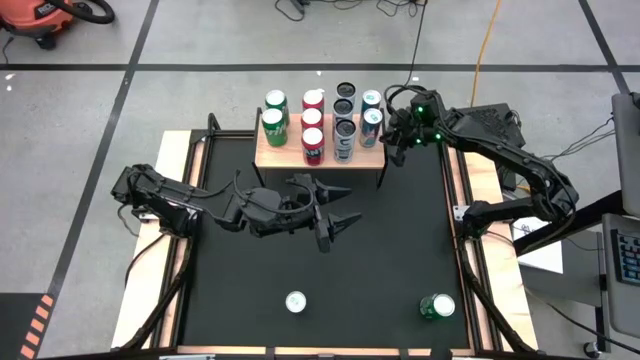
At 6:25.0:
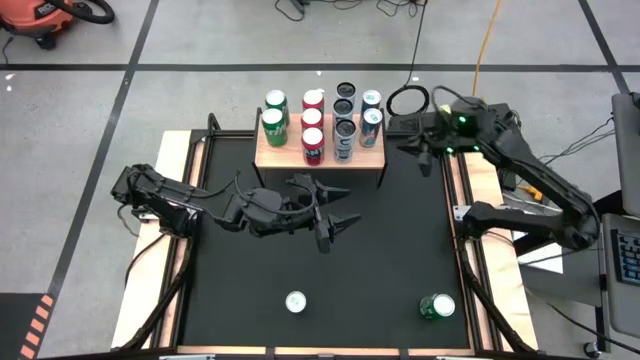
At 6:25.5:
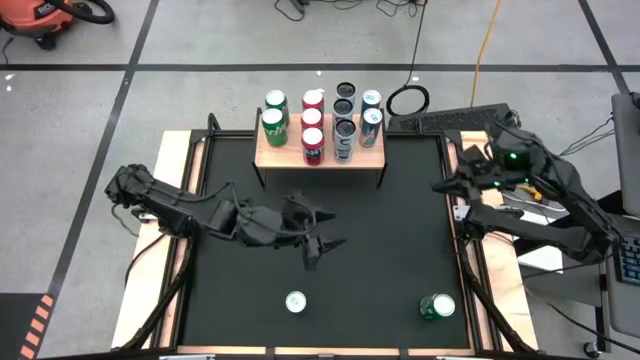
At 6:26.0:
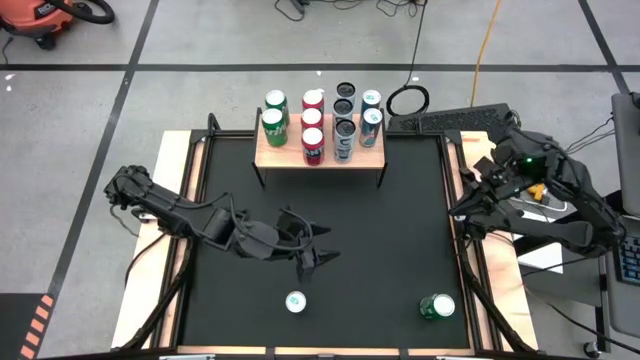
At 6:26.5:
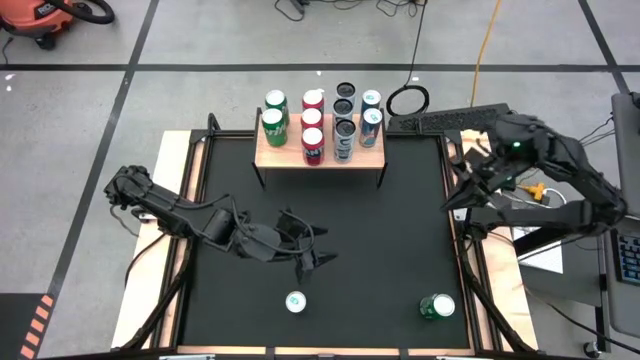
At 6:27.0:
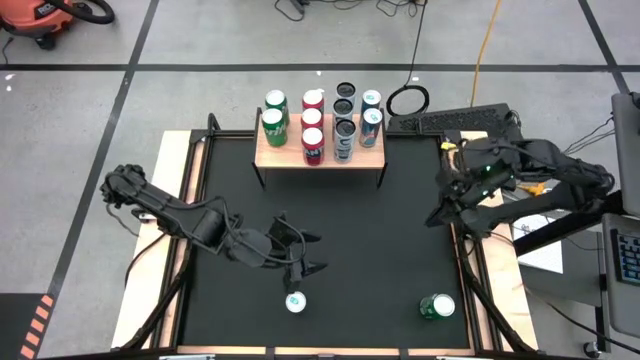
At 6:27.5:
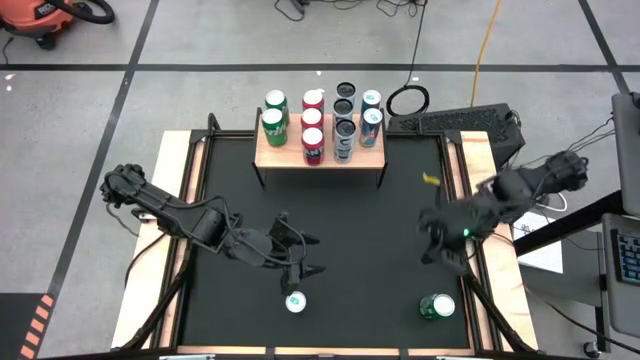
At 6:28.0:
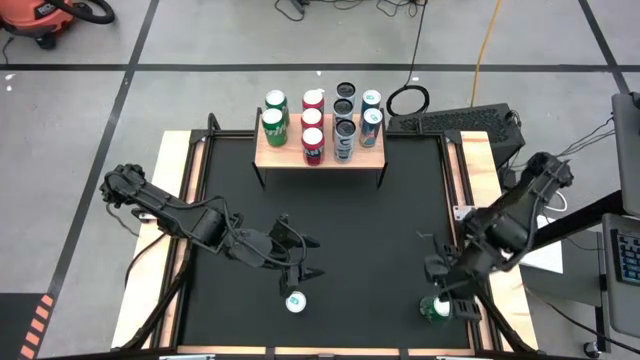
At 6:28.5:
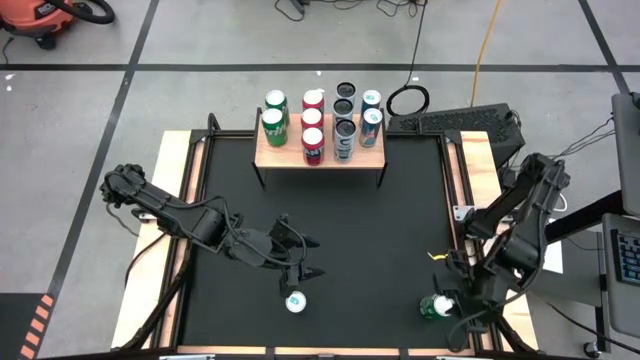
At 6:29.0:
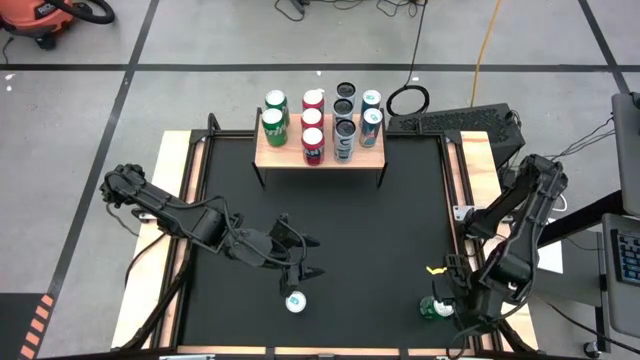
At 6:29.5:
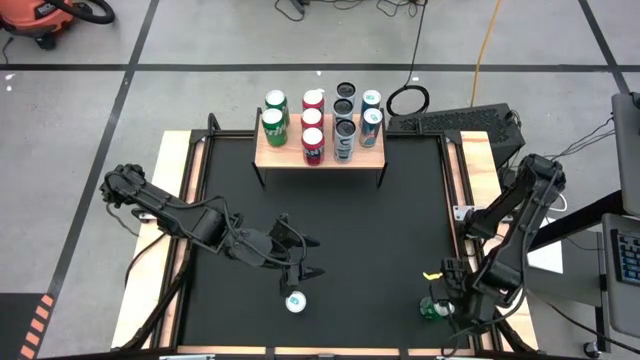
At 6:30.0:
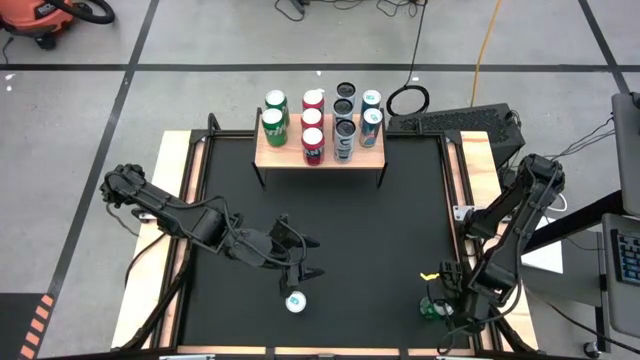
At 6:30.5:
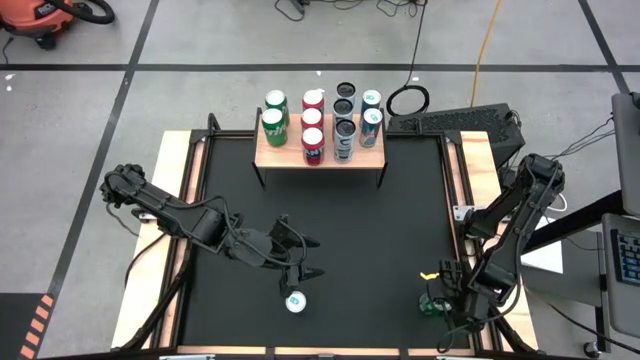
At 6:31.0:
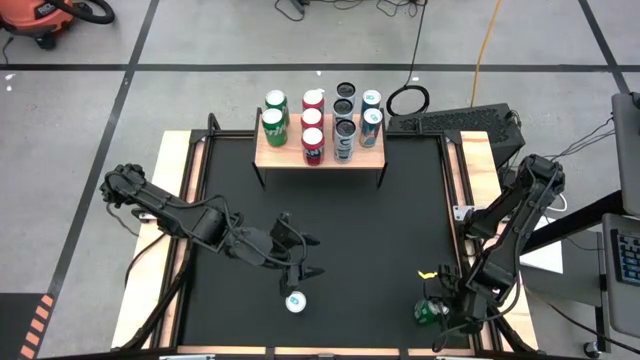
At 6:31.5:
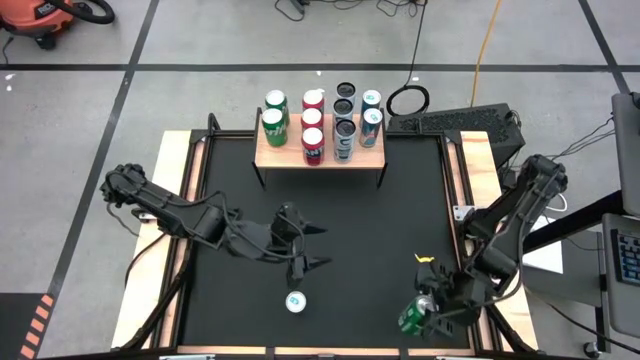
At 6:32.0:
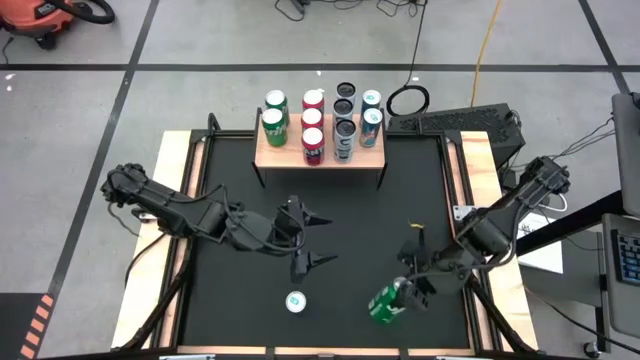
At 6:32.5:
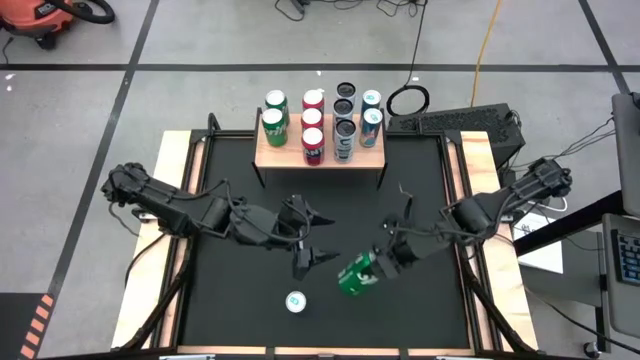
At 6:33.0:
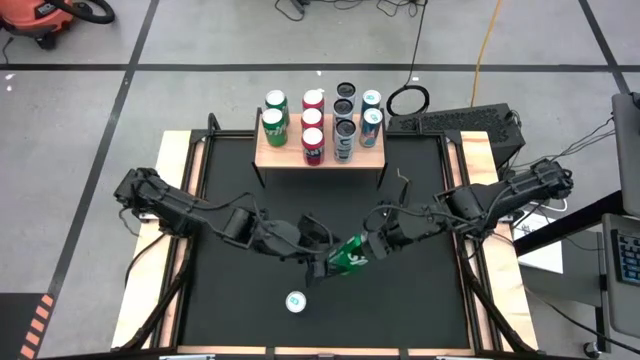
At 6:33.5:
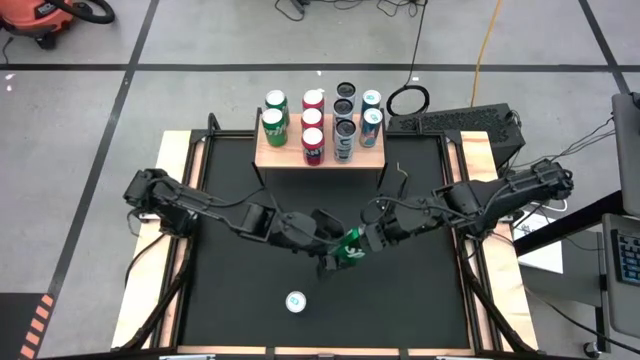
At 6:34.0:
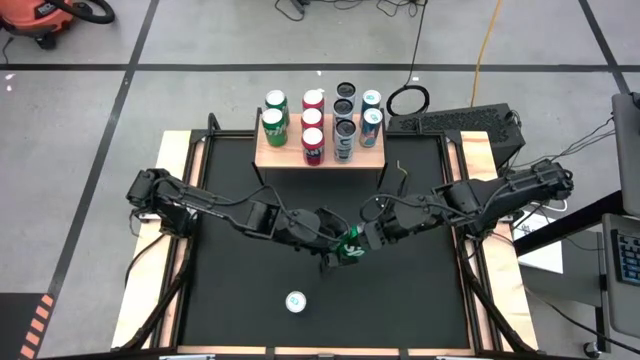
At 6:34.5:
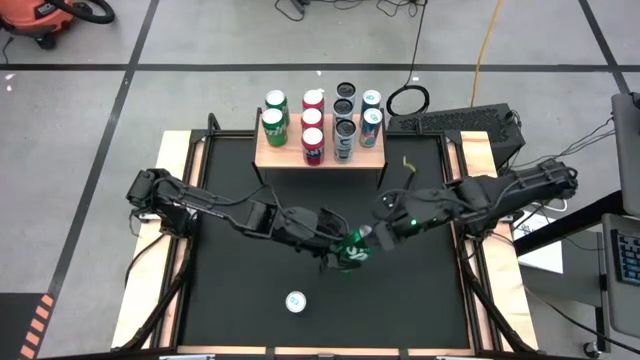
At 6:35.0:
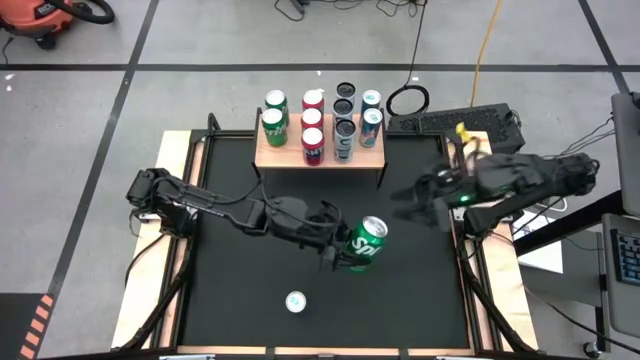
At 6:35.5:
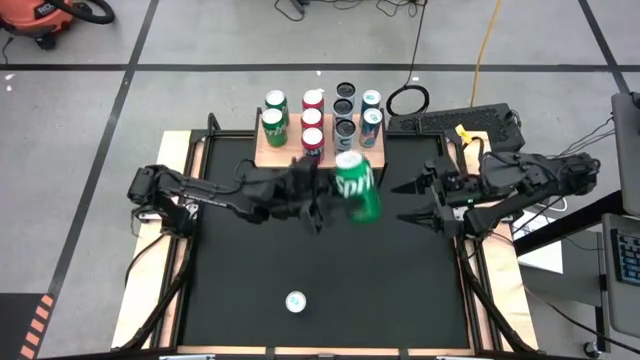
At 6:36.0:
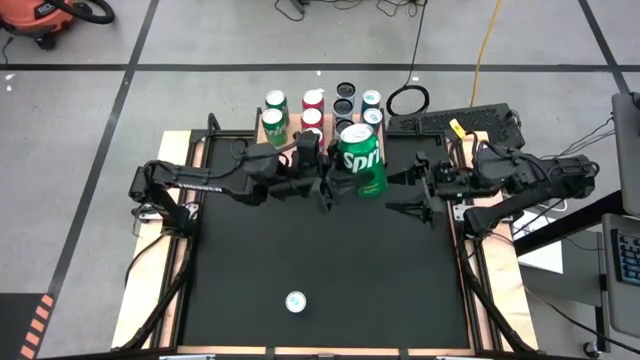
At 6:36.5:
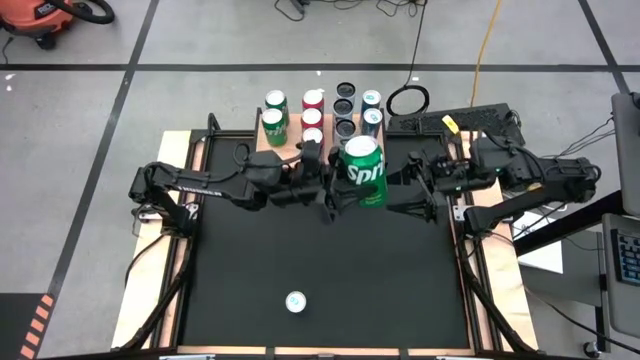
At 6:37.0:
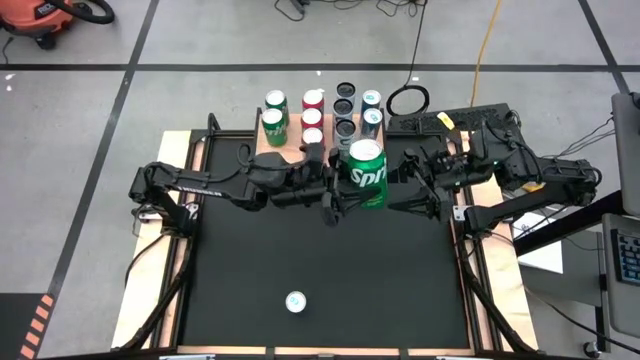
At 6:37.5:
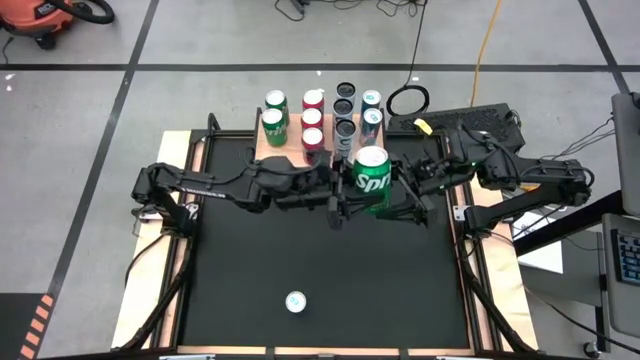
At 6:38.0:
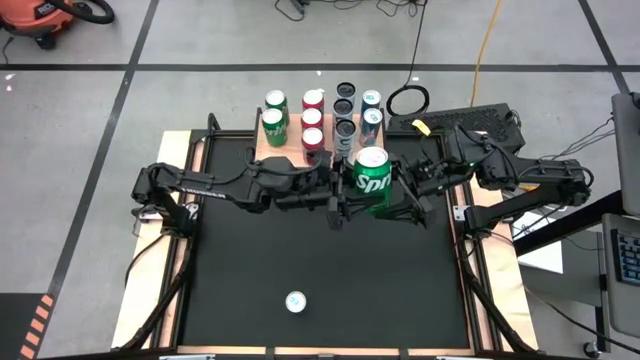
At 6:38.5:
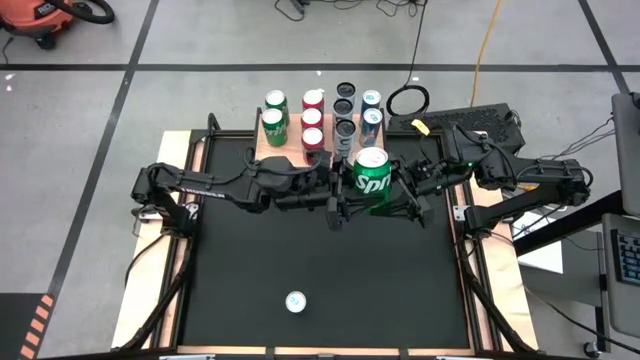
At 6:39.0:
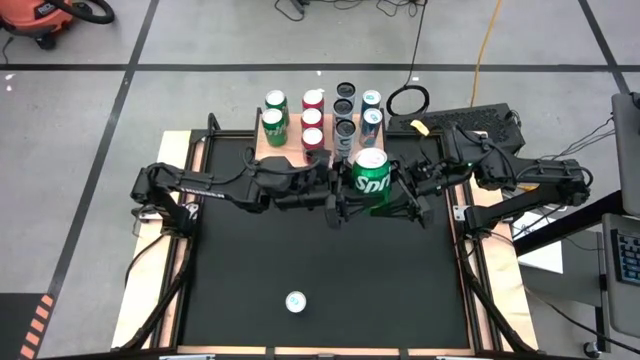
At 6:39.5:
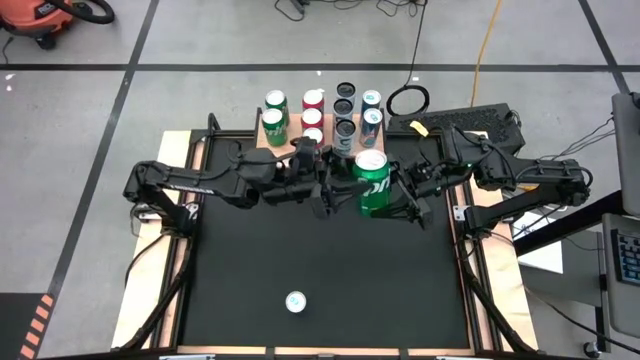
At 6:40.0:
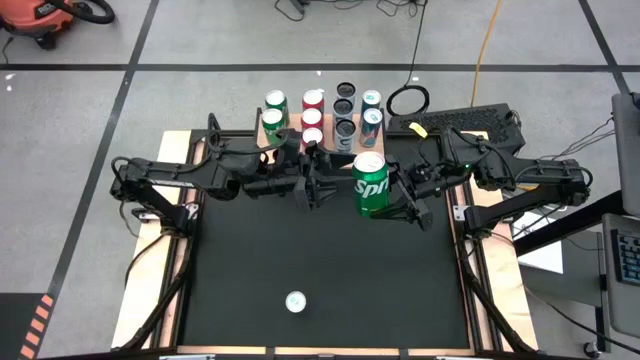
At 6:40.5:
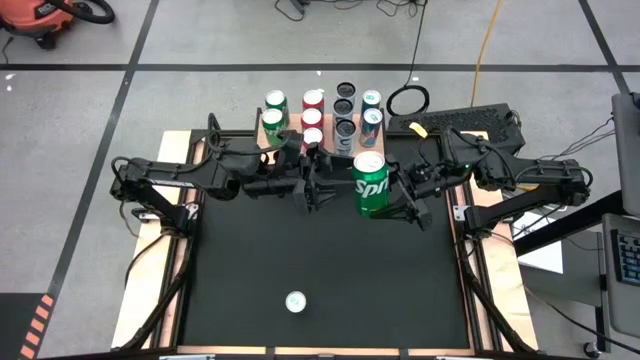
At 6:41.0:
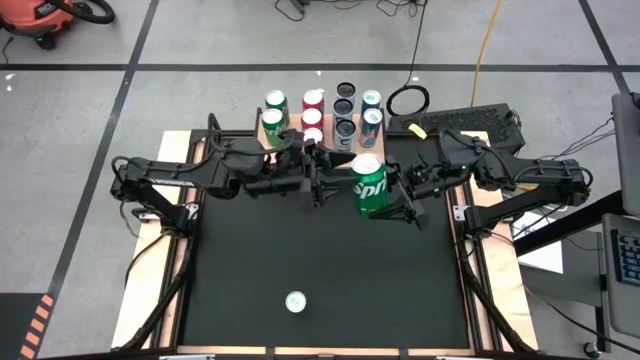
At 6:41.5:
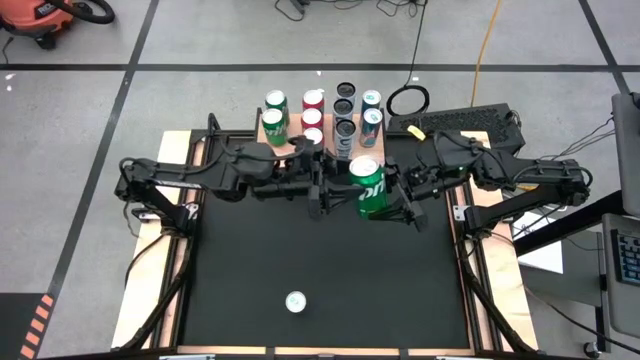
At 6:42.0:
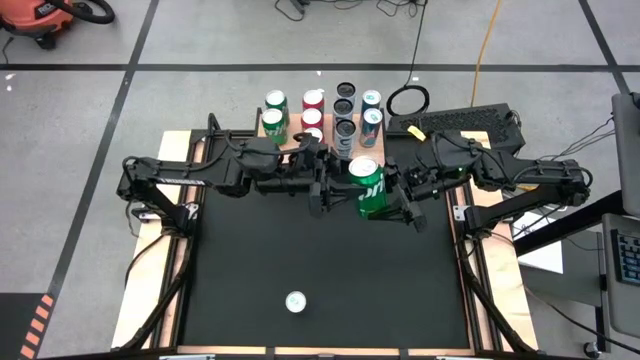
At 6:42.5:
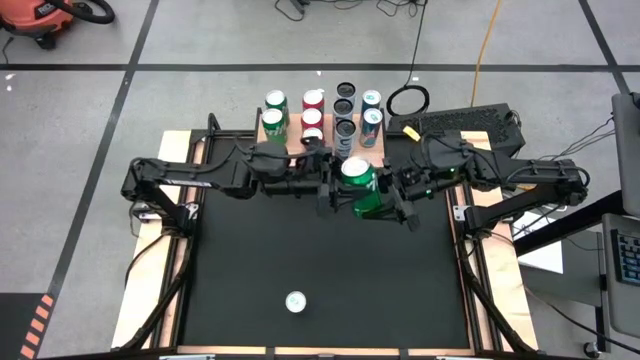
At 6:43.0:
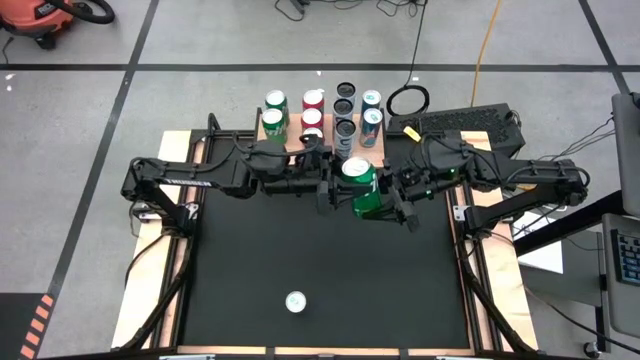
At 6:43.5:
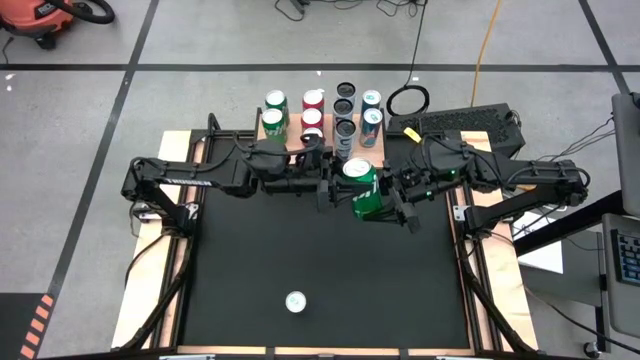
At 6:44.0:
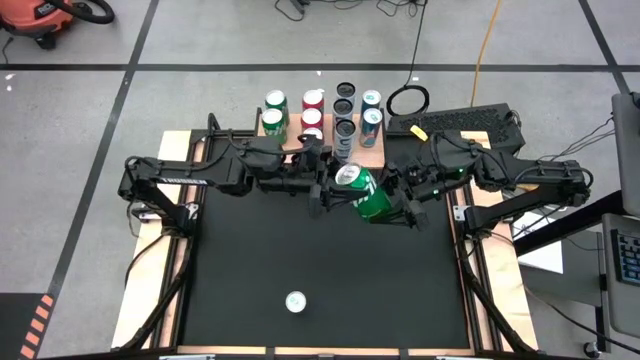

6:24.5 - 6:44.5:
Task: Place canned beverage on shelf
Put the green soda can on the shelf aligned with the other green soda can

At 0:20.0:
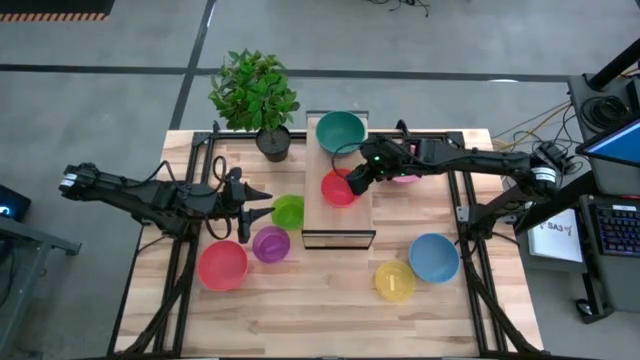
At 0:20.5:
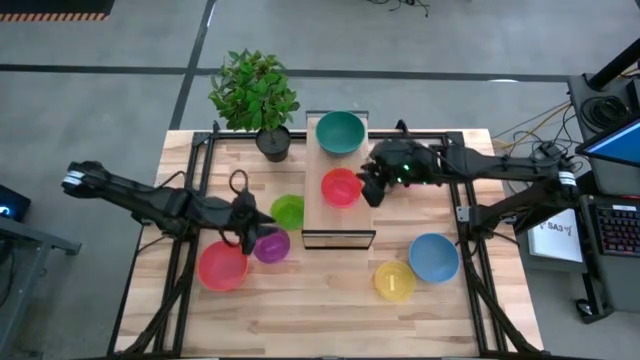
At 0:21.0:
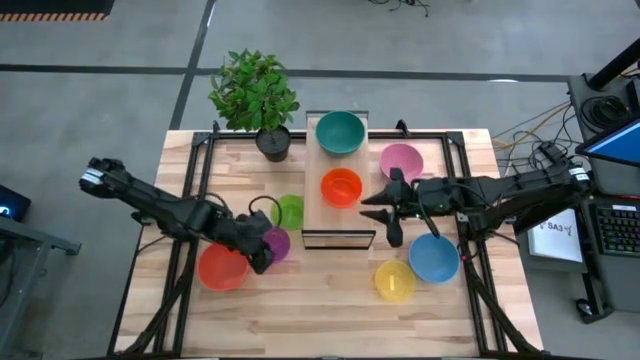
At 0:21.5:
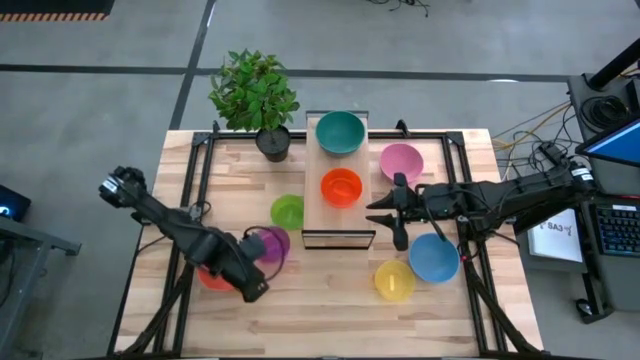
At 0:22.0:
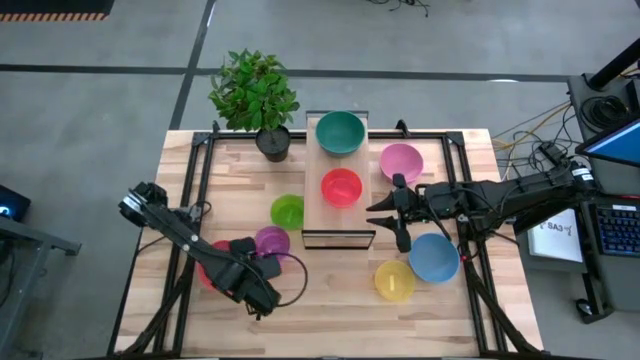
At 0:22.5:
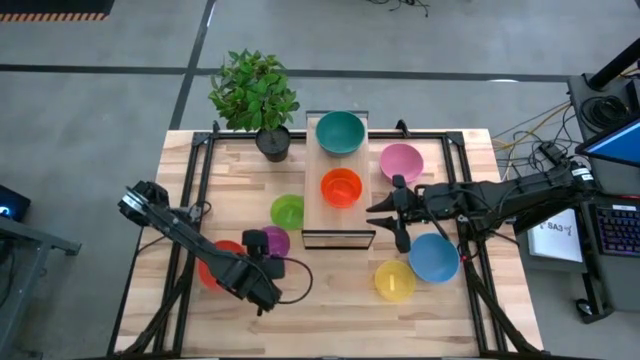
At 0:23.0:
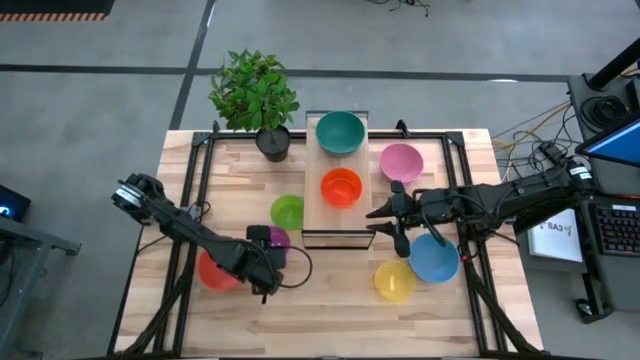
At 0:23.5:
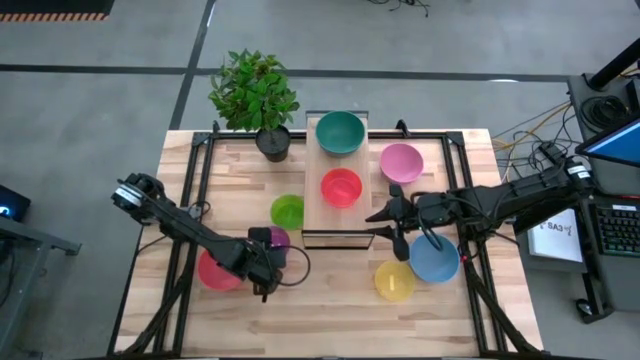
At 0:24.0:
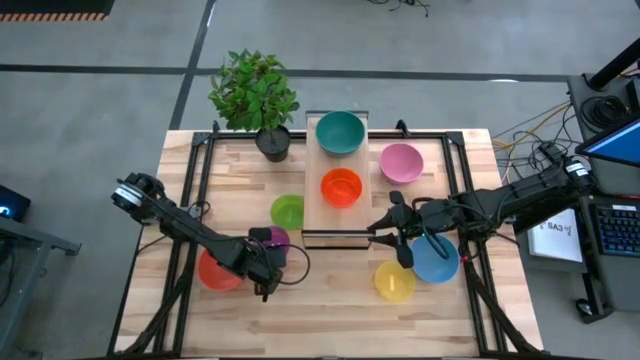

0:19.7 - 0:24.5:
Task: Place and stack bowls onto a shelf
Stack the purple transparent bowl into the orange transparent bowl on the shelf
